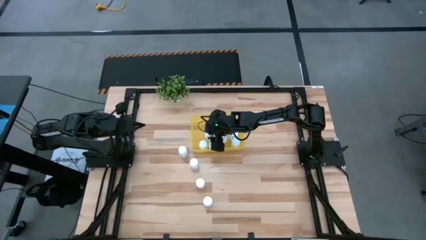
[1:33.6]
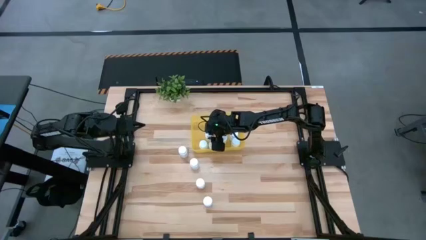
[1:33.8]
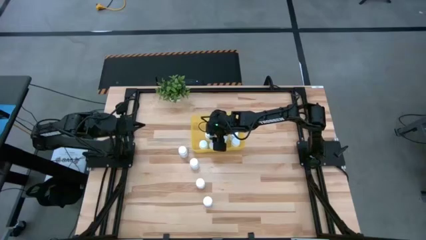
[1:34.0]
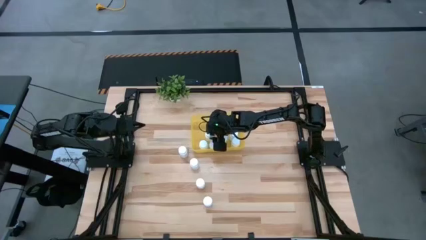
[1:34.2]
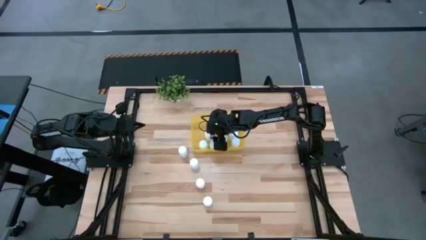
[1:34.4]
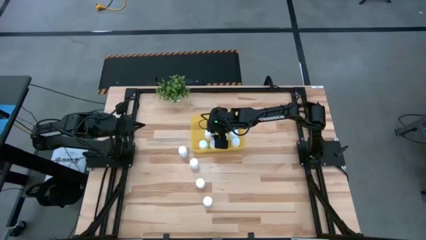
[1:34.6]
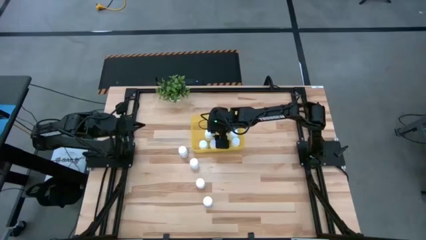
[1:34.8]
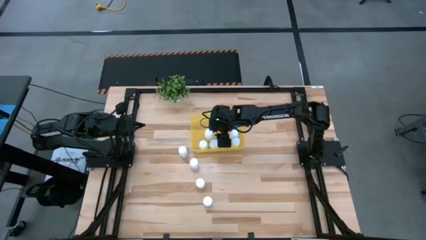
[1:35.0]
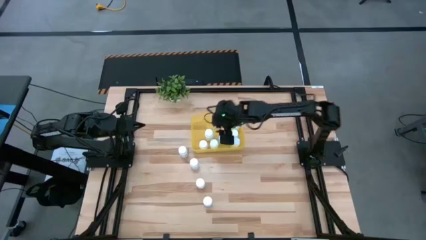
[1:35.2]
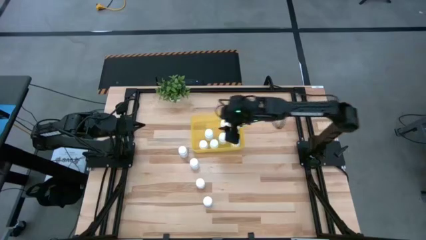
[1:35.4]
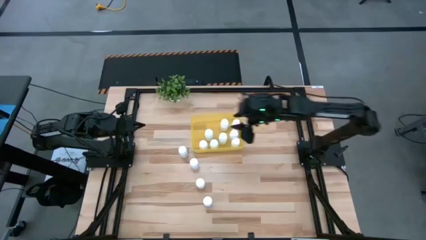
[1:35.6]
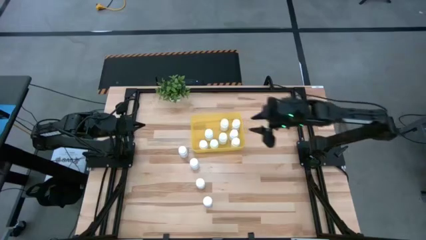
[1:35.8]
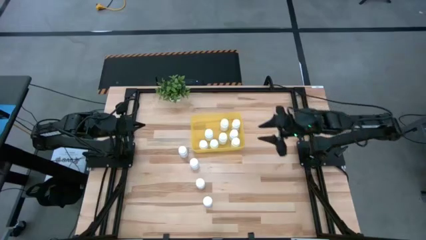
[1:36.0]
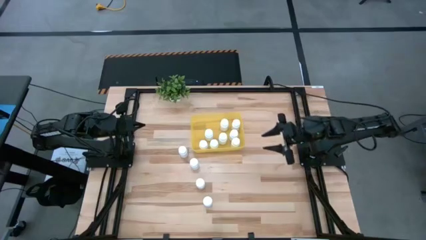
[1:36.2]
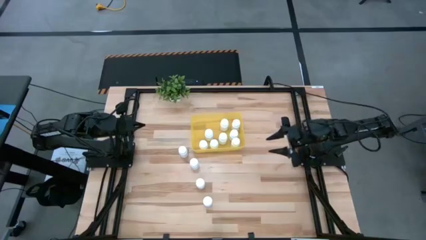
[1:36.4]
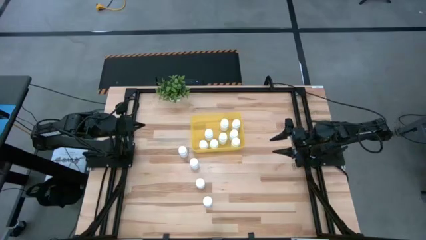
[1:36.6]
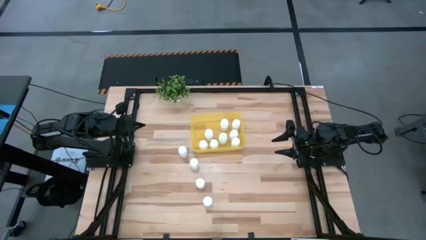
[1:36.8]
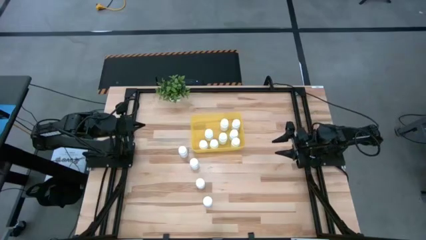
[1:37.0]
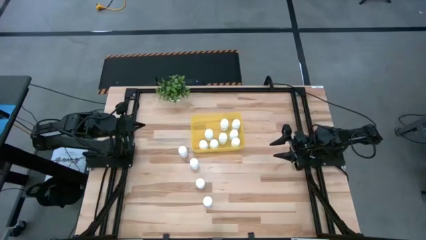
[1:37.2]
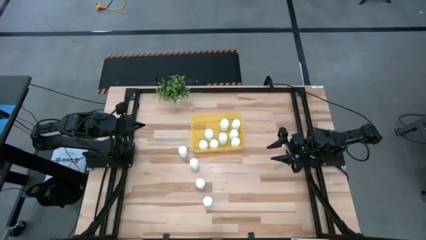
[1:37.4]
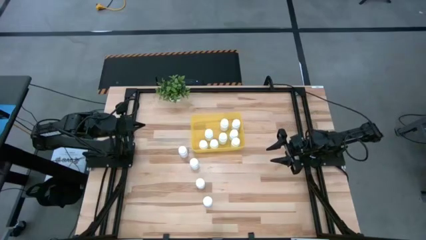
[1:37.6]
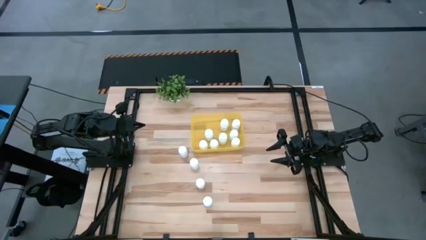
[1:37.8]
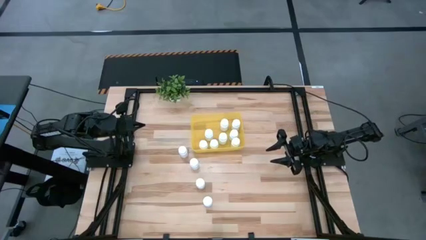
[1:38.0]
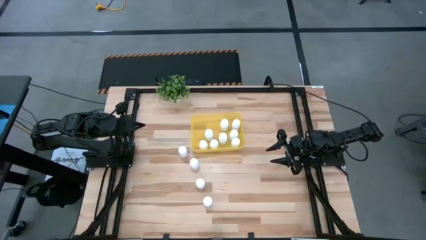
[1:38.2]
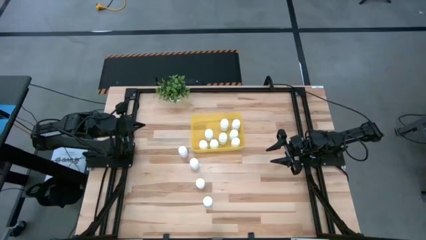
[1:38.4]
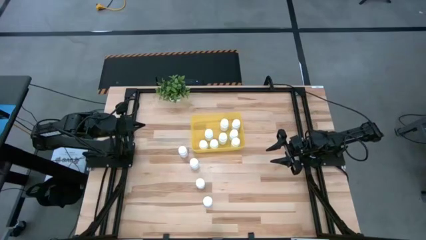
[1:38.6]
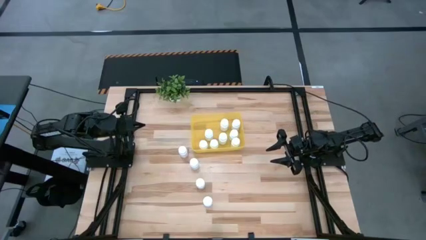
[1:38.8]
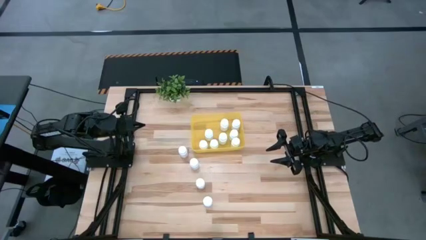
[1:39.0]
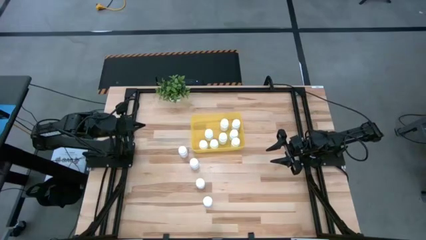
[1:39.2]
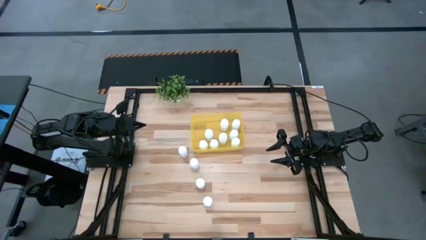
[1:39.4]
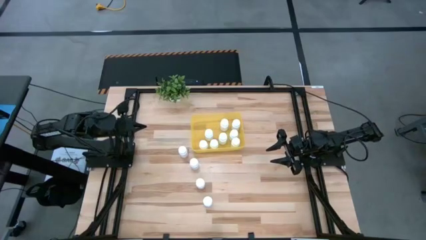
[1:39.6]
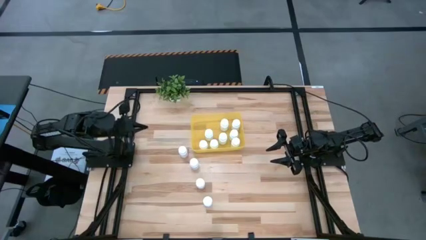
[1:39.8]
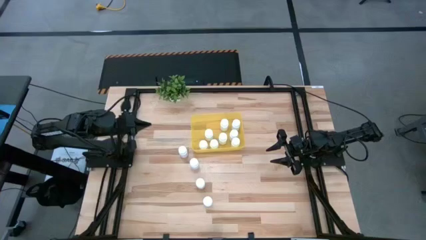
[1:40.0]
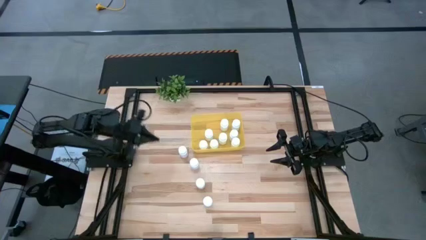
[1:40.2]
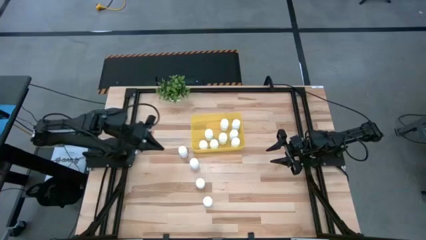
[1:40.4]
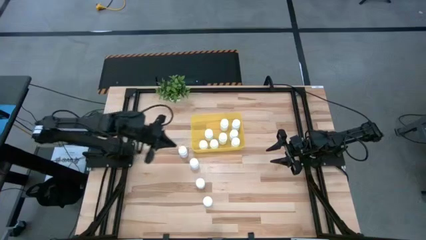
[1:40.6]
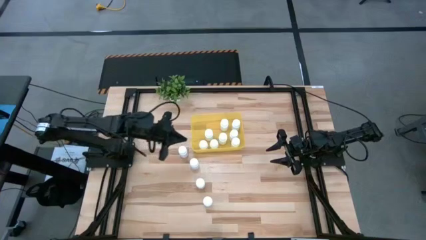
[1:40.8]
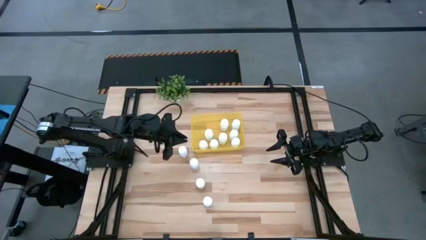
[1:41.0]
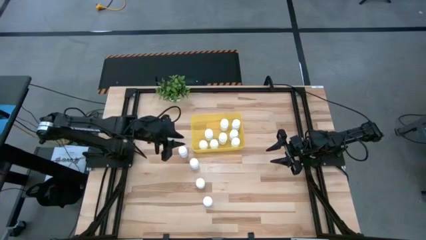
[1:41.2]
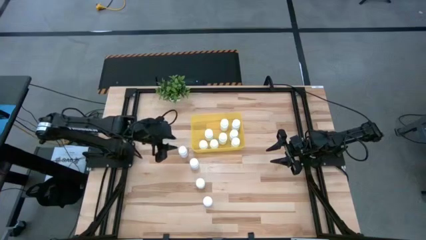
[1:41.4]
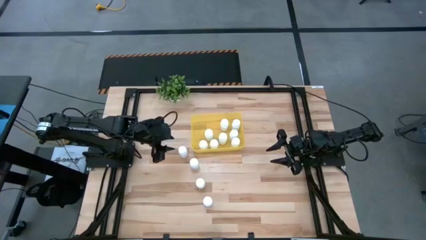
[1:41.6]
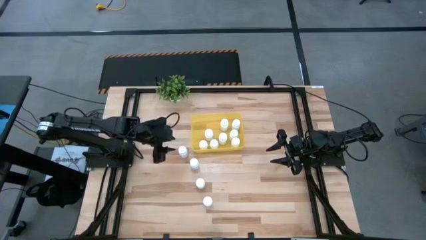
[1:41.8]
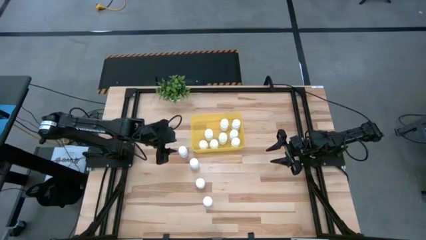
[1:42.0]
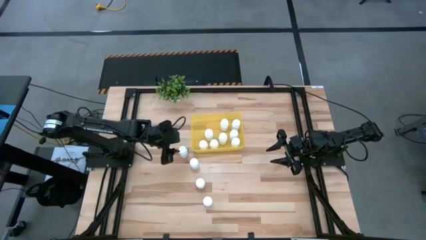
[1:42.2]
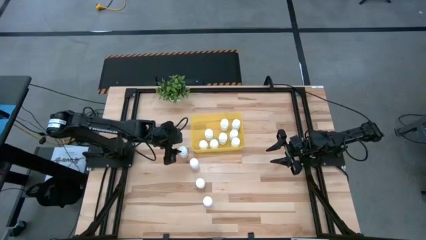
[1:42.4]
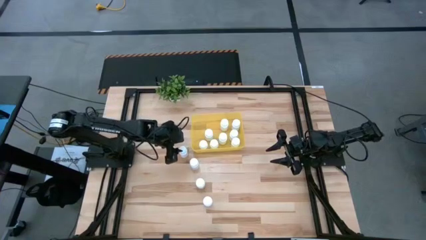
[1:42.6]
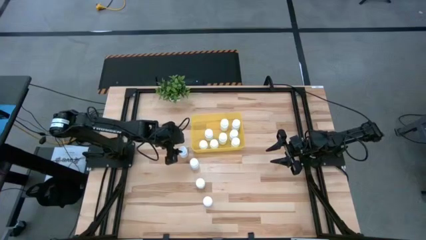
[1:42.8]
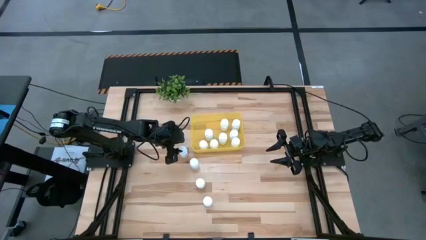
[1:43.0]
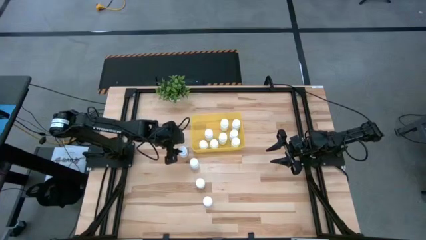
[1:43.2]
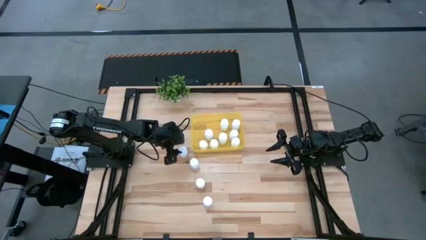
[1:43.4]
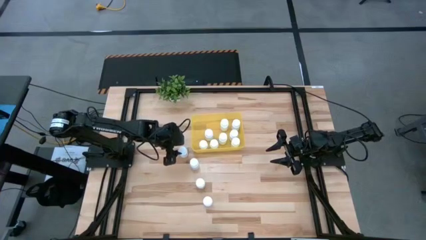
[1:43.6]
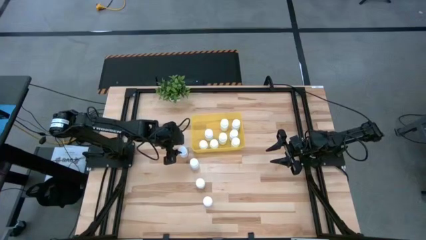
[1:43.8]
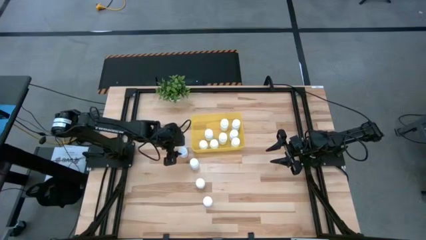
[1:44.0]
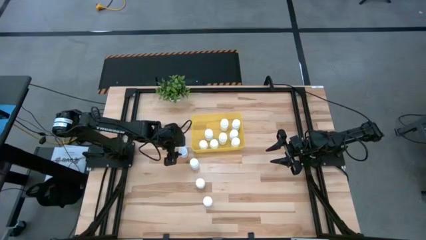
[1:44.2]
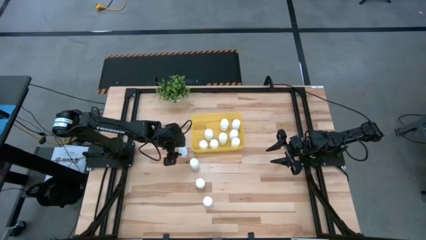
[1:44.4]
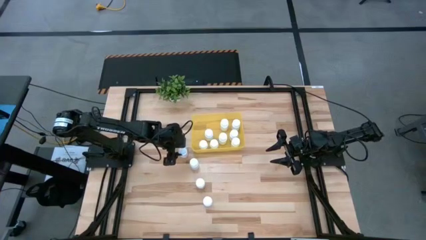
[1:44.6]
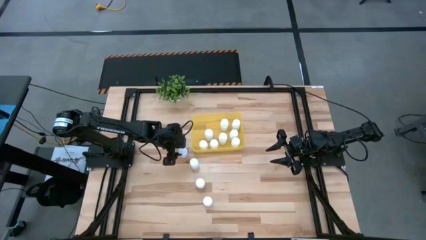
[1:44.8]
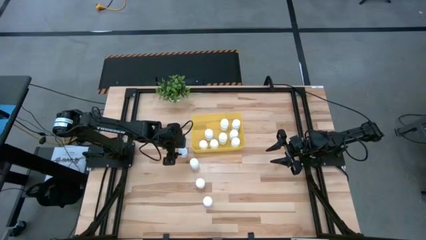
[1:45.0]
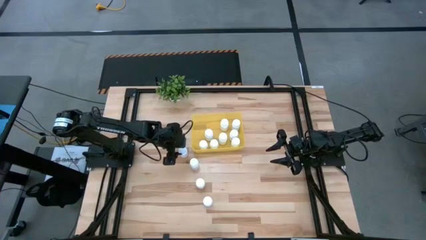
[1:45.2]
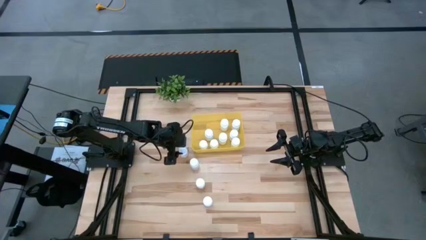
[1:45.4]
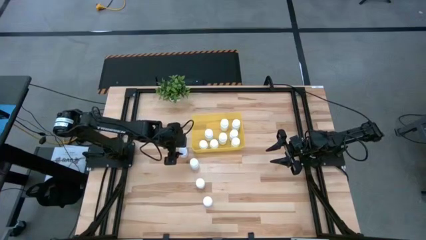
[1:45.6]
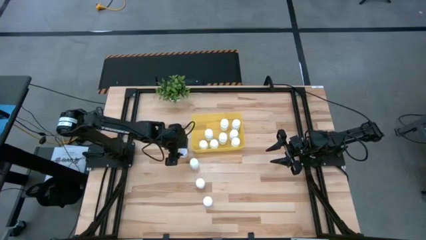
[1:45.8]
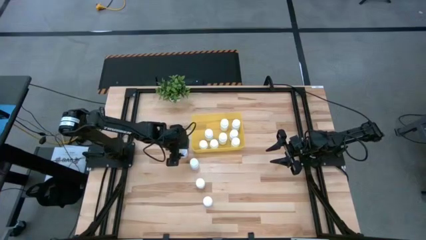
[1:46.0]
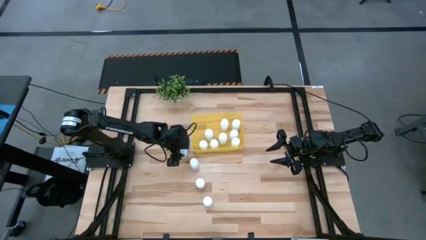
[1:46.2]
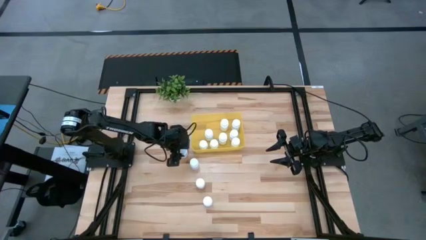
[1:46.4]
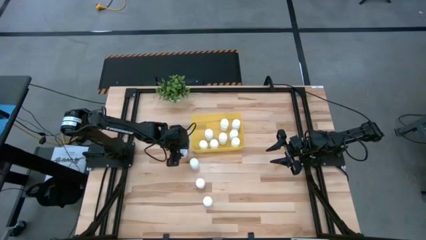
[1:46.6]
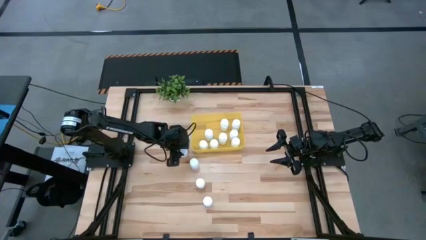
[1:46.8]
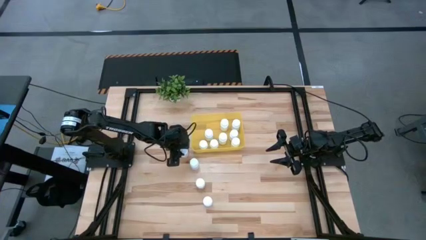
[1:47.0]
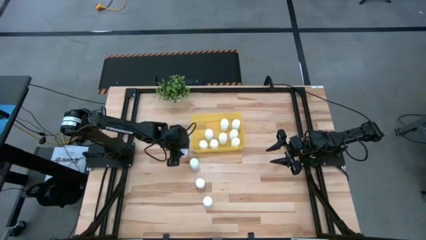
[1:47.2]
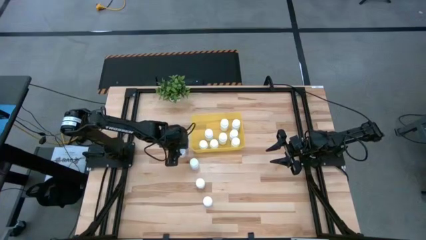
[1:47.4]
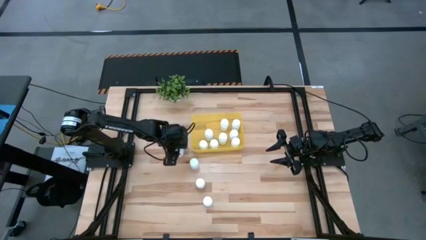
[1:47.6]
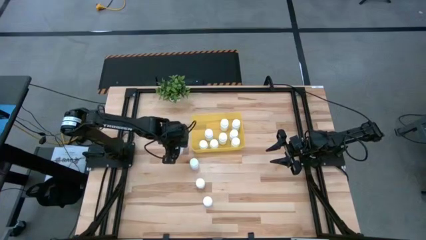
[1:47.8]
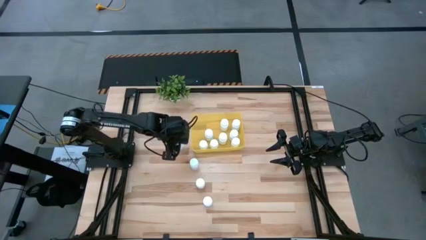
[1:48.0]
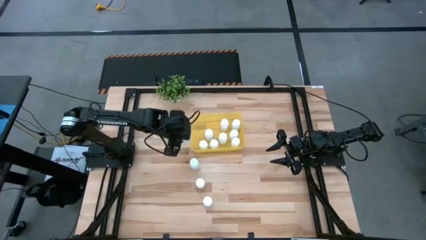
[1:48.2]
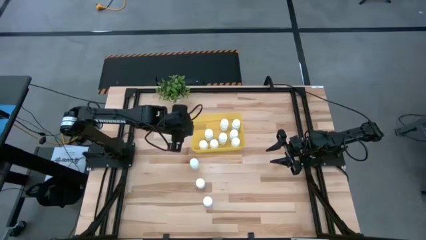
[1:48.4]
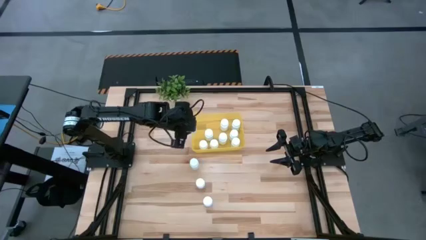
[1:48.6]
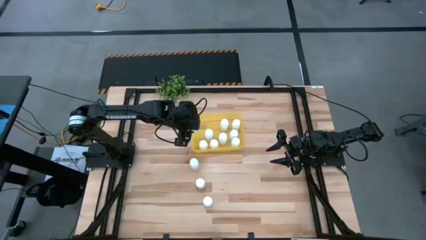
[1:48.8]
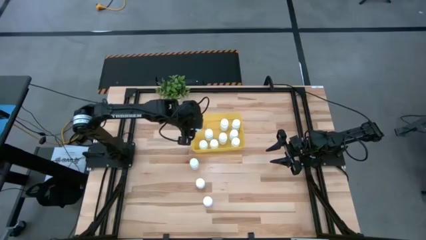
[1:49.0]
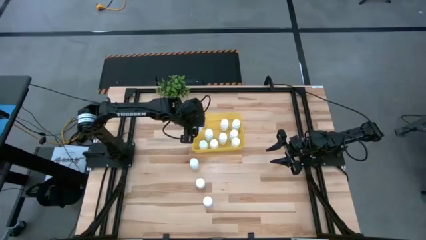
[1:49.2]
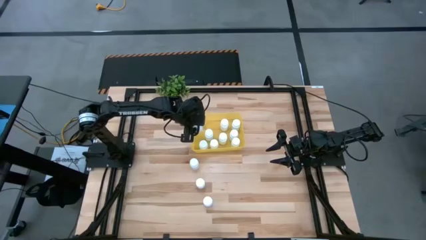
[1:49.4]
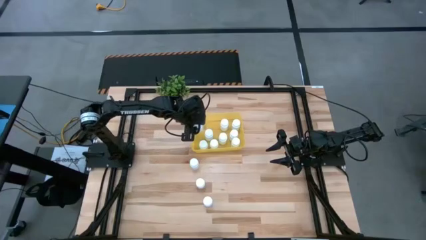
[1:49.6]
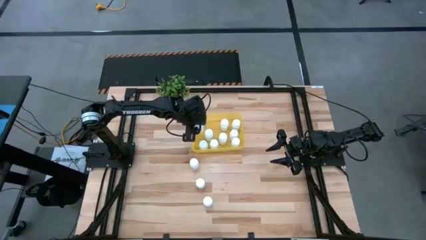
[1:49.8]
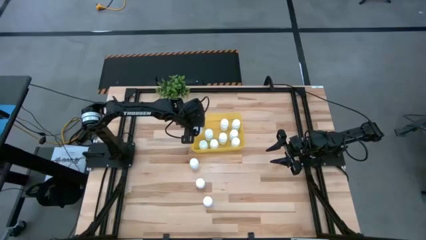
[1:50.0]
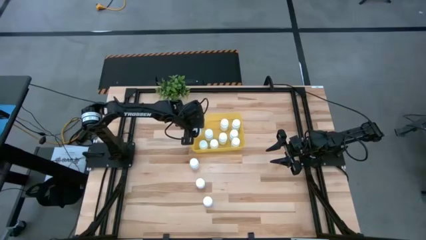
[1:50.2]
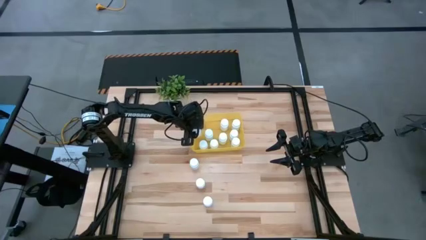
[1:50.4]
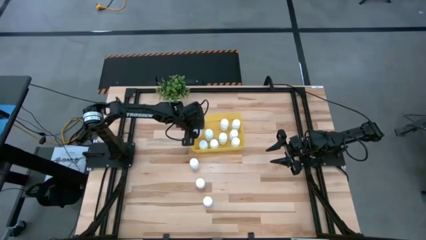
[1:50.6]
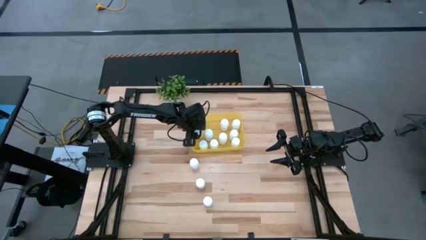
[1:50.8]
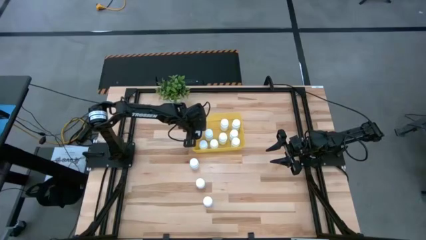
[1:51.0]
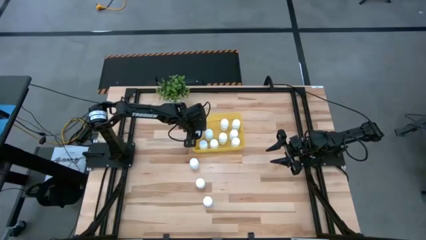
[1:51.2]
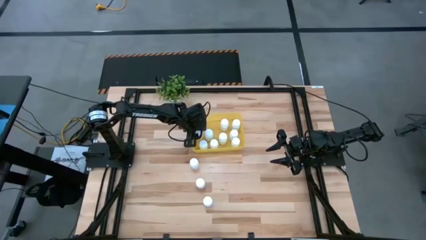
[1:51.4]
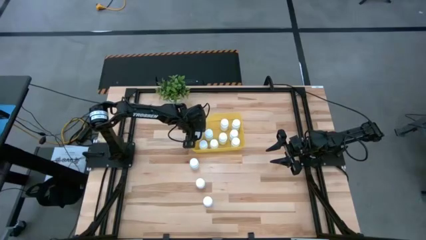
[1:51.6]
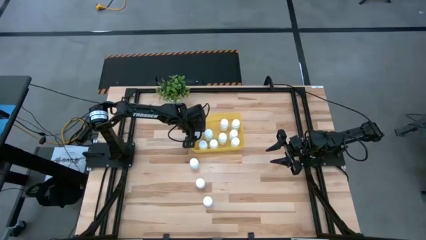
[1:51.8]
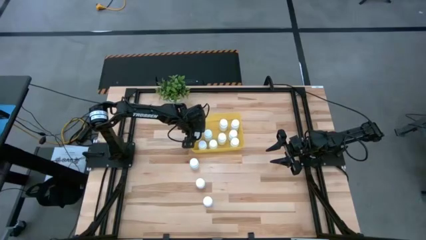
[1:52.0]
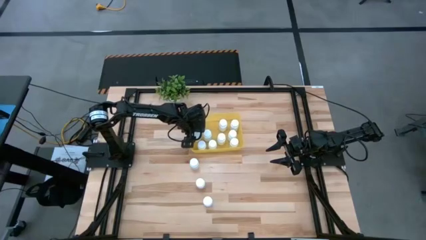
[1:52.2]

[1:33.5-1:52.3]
Task: Pick and place pill bottles into a basket
Put the white medicine bottle into the yellow bin
